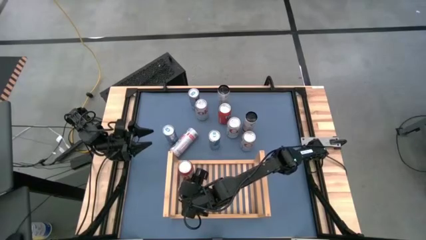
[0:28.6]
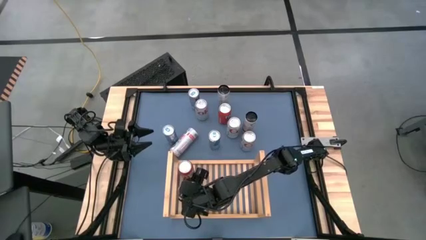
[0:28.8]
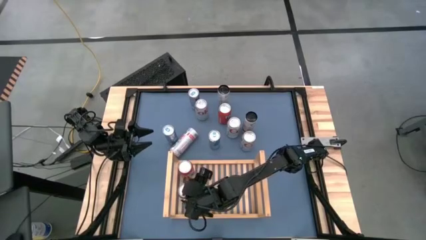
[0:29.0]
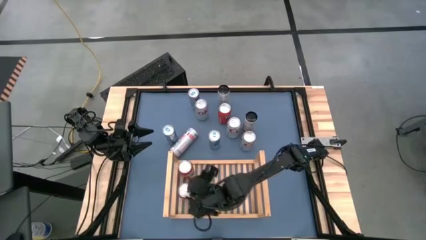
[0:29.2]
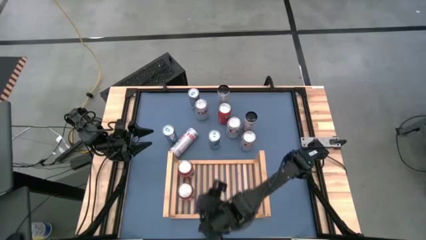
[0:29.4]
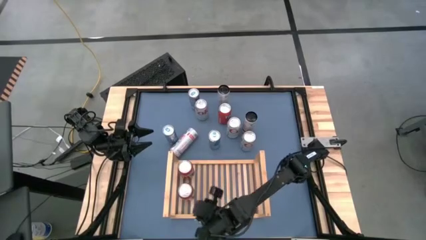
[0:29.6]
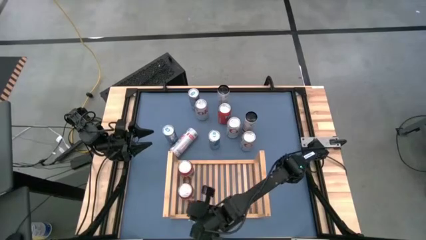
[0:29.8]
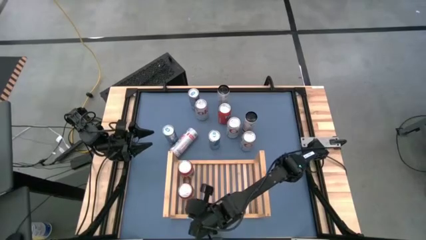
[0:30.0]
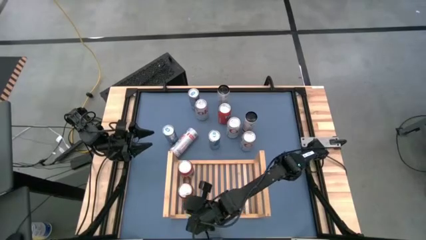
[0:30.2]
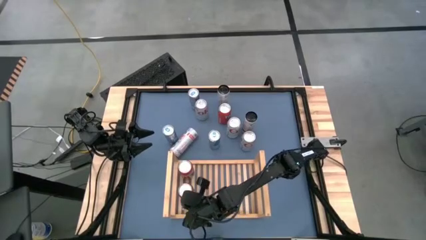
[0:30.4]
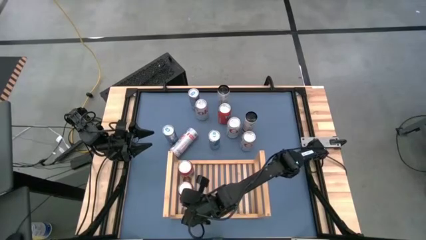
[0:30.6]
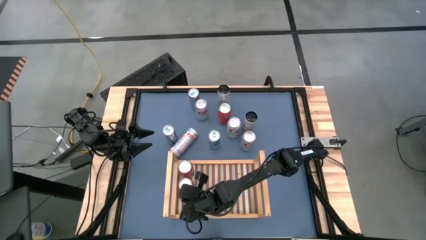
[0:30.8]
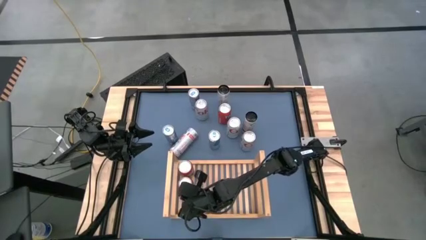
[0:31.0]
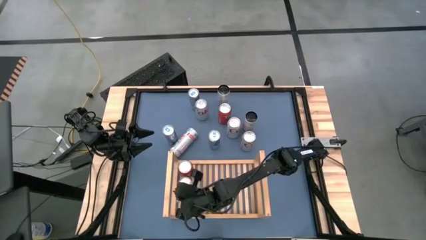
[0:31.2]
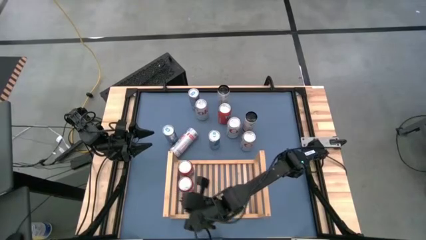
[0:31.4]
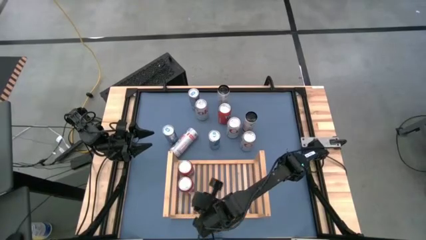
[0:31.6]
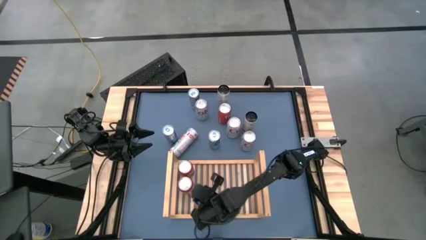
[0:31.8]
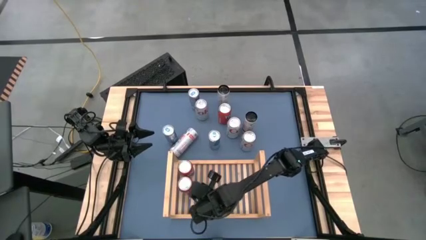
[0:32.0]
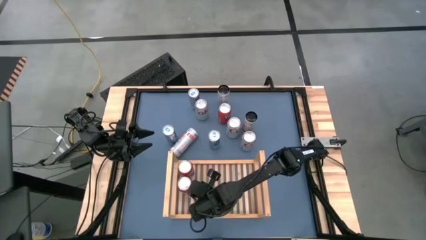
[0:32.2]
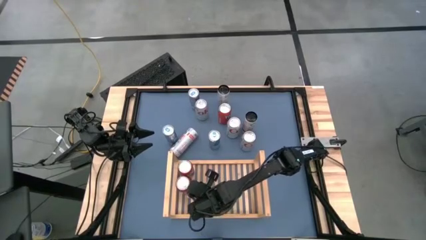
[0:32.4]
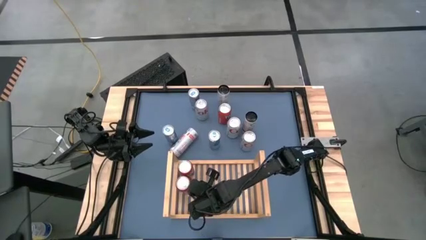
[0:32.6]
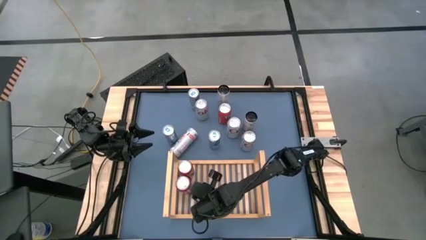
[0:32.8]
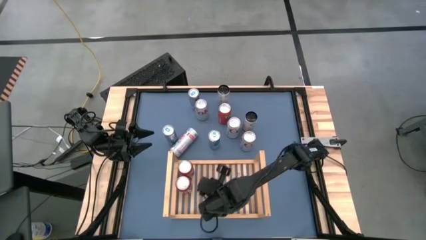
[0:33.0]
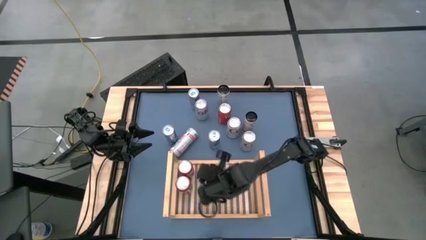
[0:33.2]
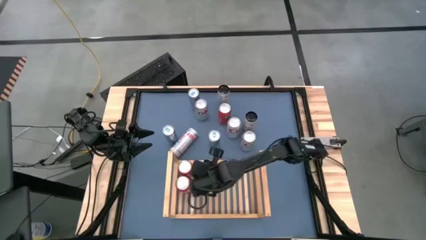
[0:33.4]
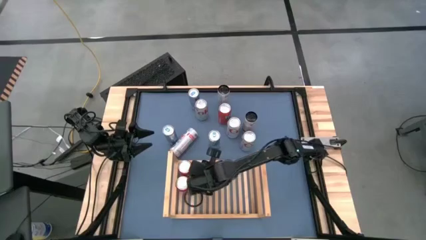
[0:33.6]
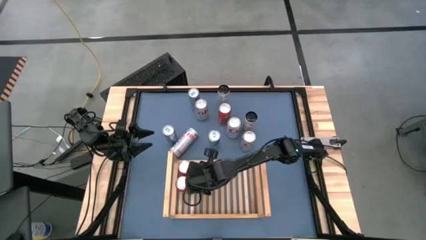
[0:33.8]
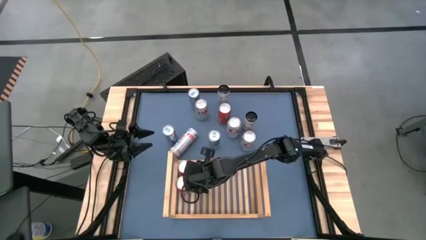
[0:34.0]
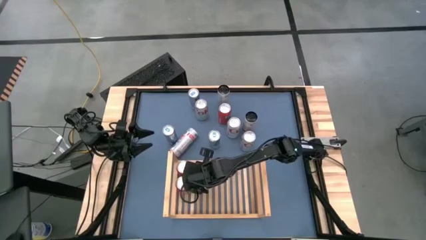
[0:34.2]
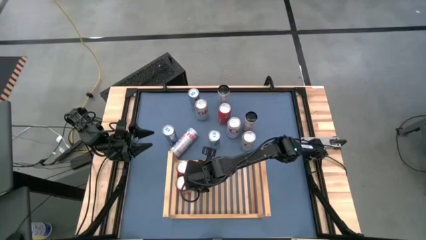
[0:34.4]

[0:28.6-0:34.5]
Task: Place canned beverage on shelf
Adjust the red soda can on the shelf

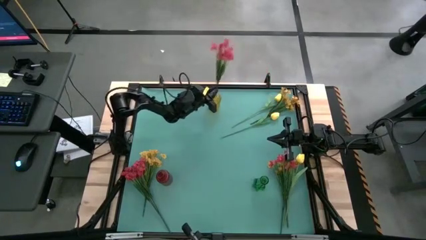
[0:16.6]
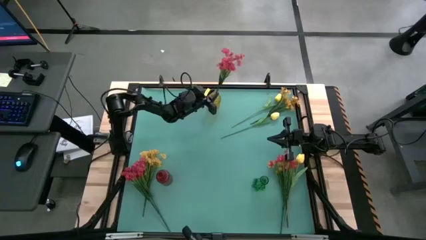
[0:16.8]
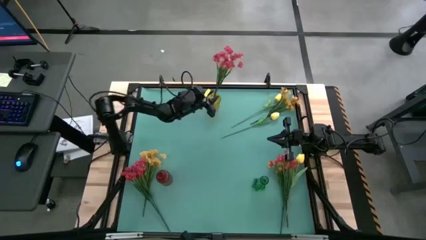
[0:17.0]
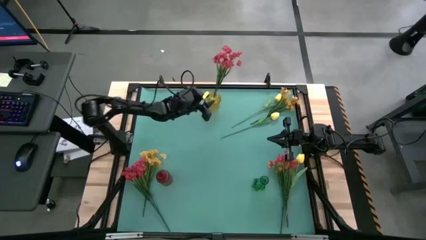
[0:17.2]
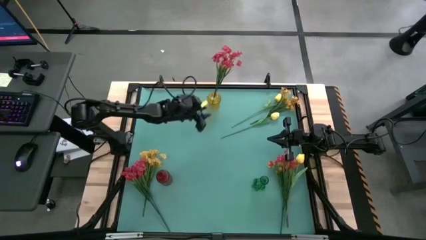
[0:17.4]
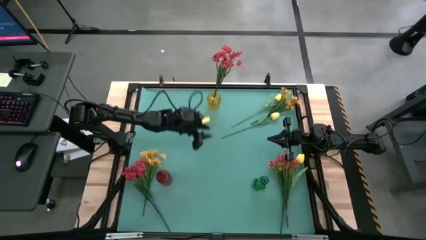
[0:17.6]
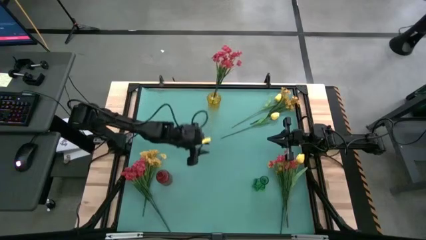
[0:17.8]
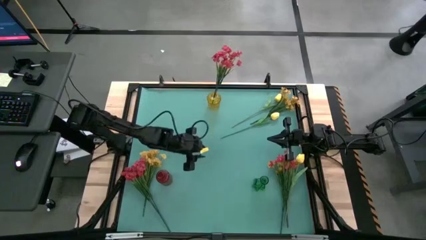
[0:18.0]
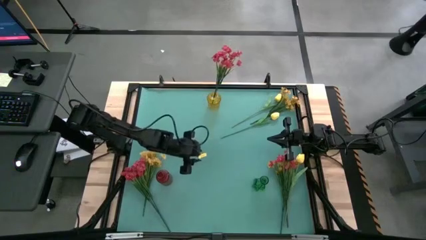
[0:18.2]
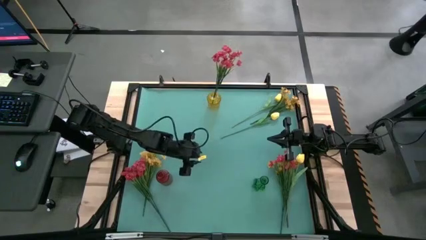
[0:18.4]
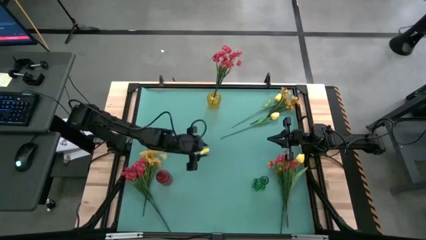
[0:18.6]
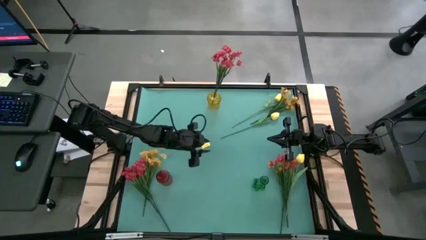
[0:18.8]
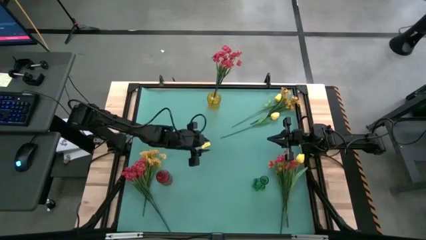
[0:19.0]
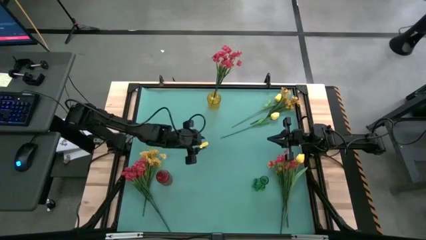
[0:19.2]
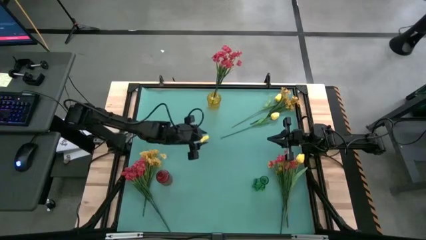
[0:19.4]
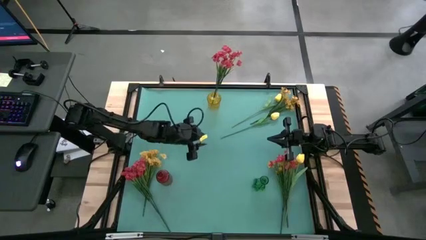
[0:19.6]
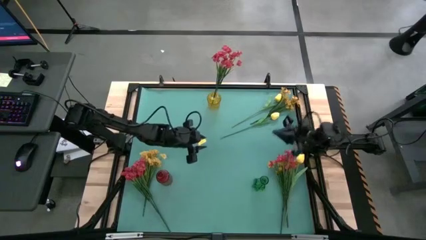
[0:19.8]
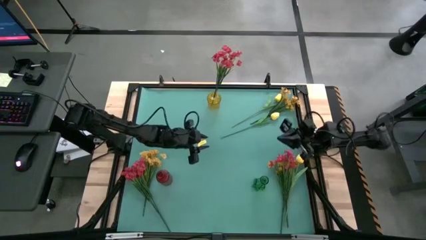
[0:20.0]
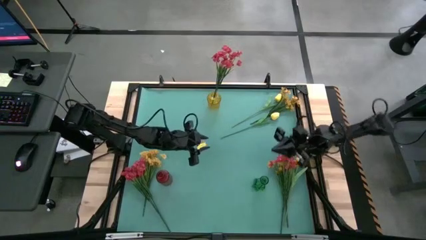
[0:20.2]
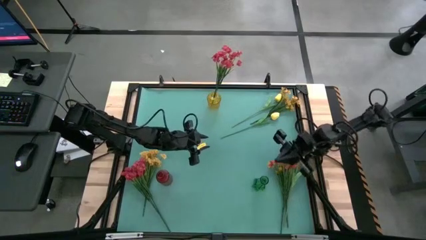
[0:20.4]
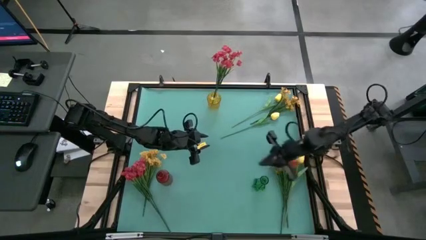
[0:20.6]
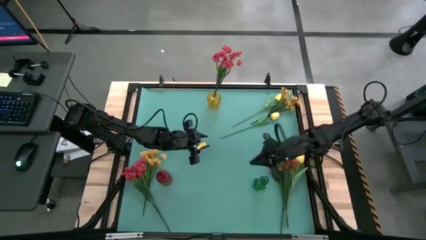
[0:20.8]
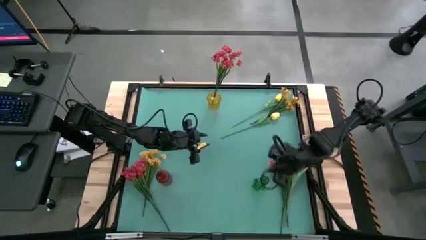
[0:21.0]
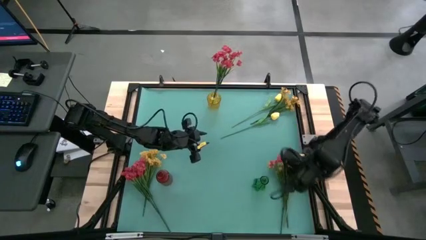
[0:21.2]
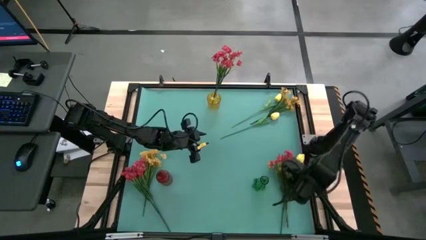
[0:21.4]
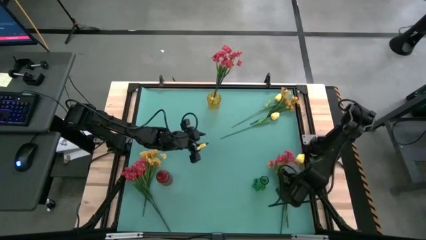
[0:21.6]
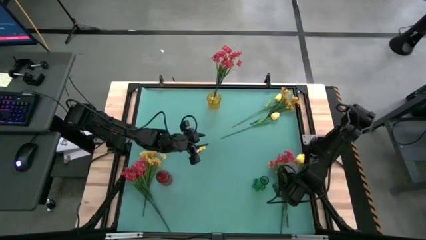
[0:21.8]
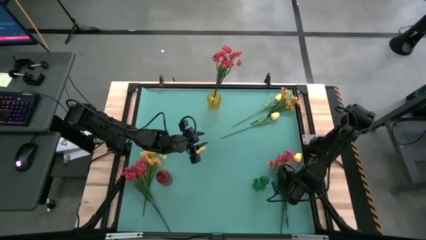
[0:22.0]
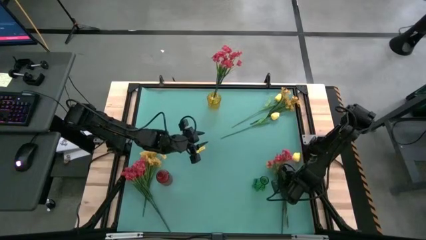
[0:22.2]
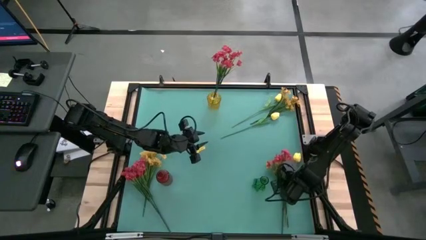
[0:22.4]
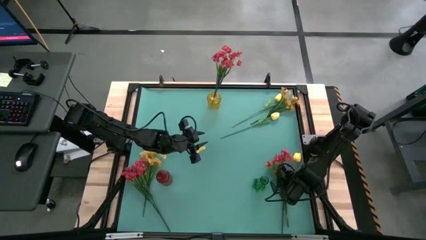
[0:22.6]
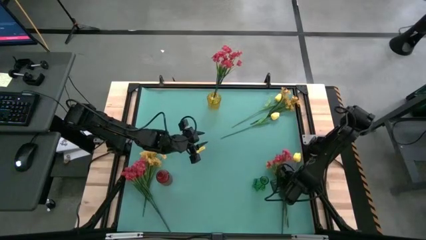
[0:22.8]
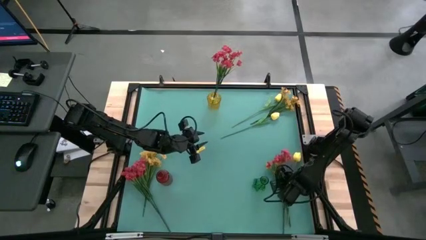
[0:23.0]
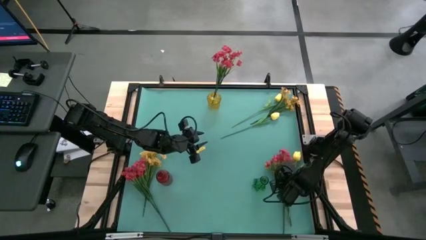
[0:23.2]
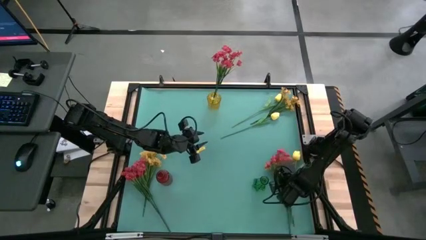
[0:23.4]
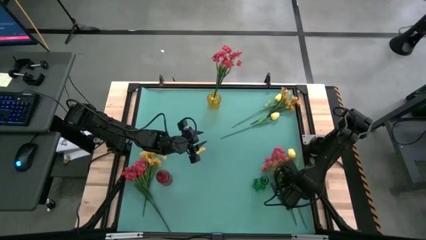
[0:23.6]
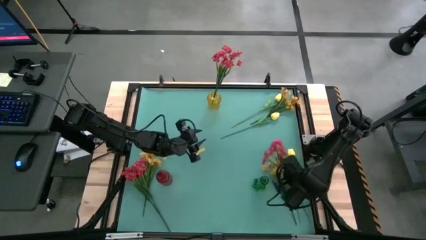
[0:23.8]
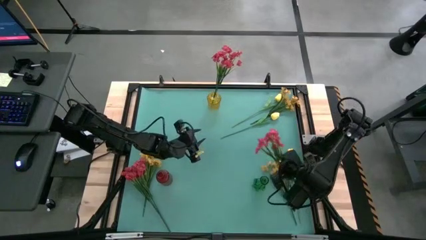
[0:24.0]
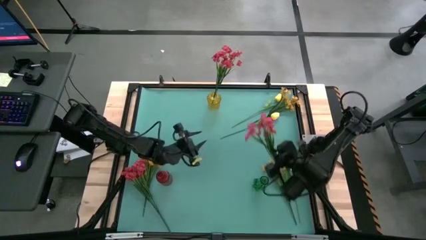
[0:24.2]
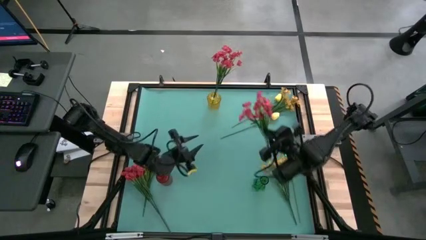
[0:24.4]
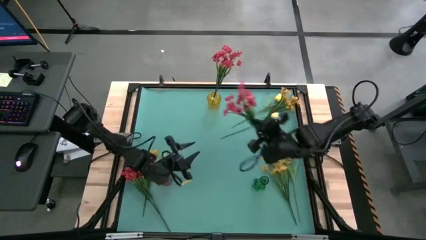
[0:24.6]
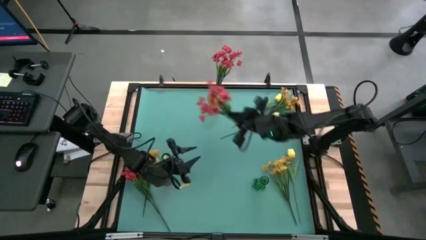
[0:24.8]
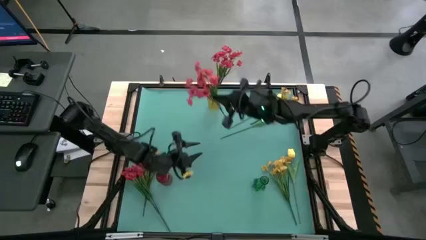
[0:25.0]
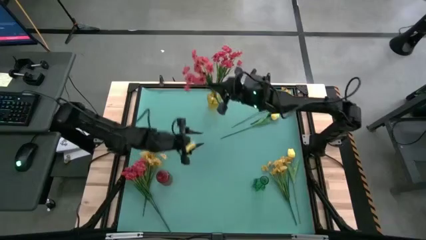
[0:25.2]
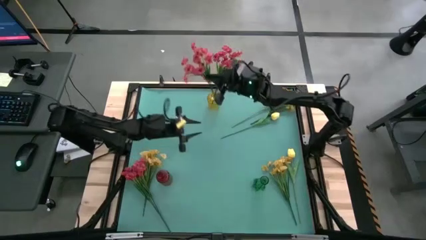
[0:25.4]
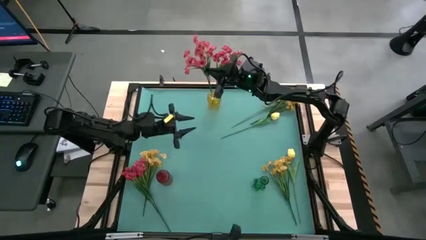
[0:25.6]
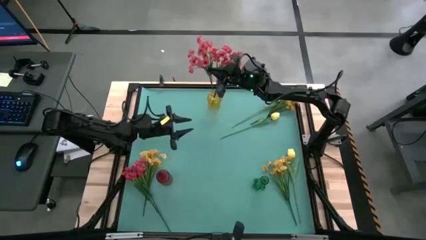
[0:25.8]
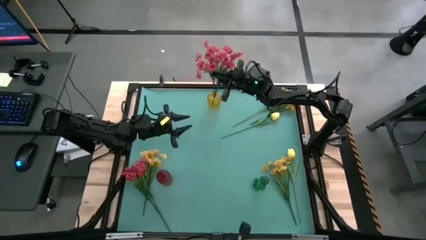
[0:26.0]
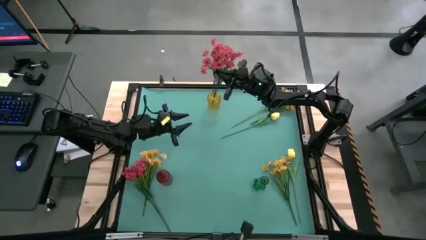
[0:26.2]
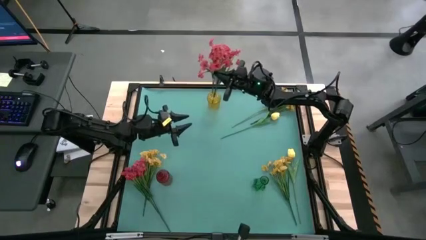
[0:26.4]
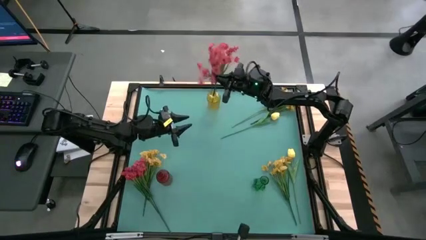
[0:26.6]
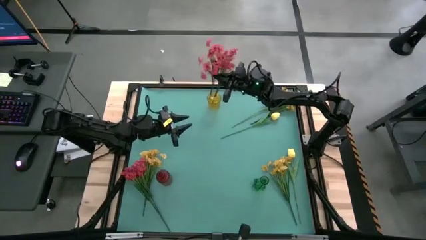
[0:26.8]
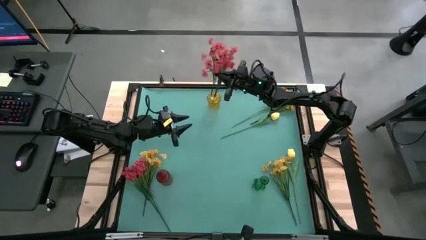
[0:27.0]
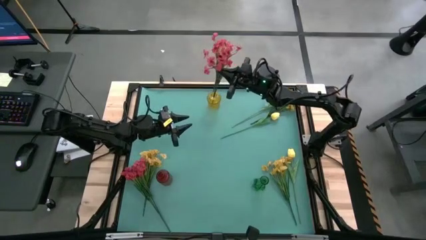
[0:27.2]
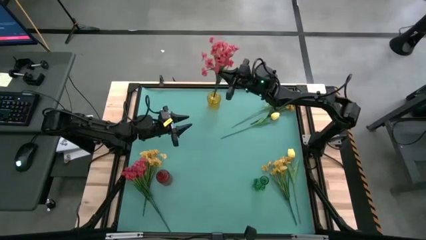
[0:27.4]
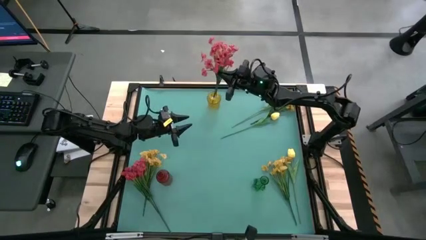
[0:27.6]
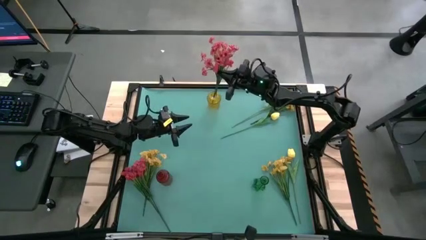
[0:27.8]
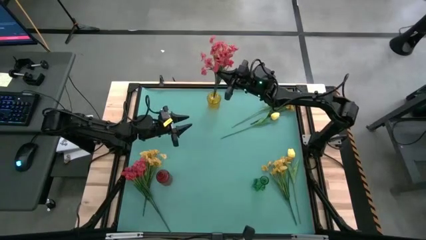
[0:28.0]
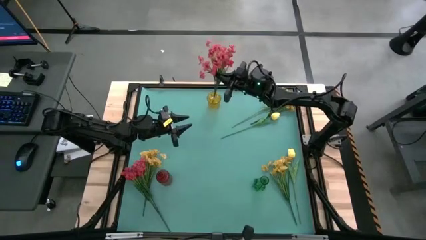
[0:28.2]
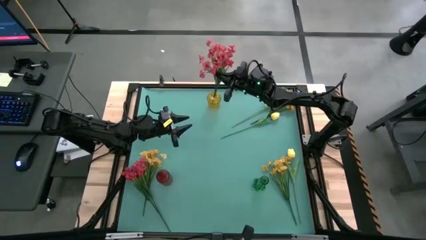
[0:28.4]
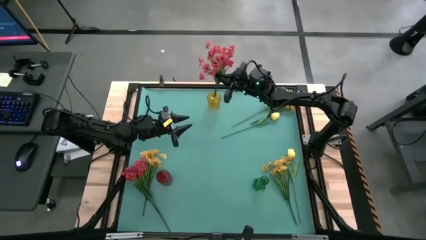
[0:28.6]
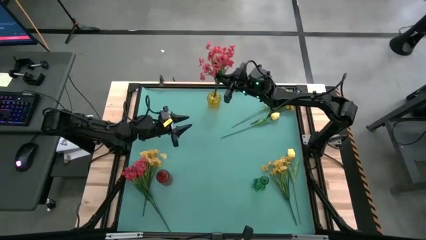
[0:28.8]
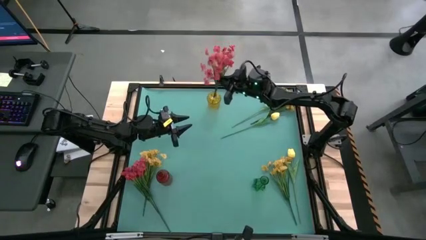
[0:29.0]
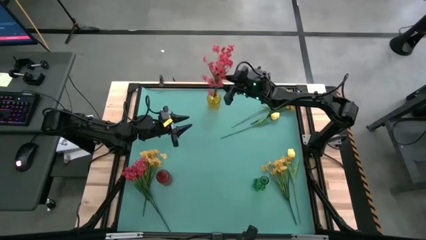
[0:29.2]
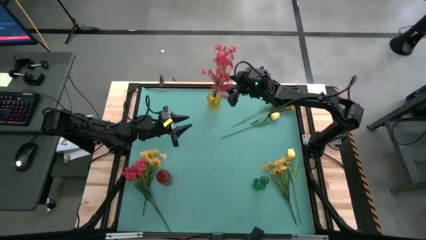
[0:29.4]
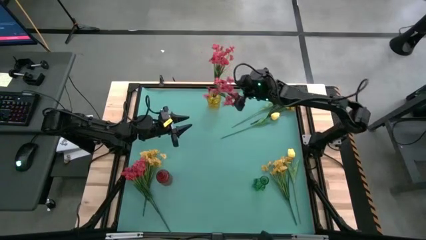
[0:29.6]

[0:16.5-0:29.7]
Task: Sort flowers into vase by color
Put the right red flowers into the yellow vase
